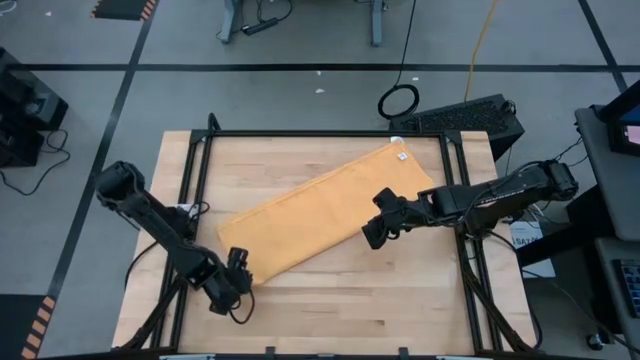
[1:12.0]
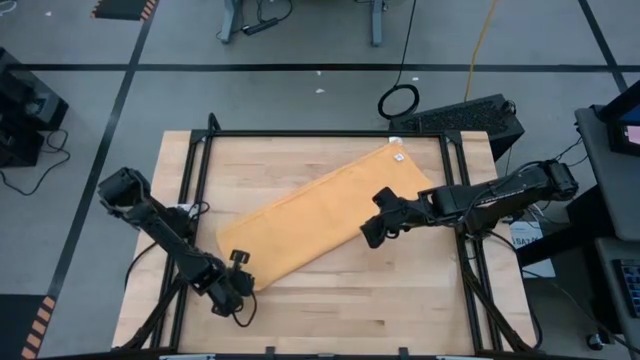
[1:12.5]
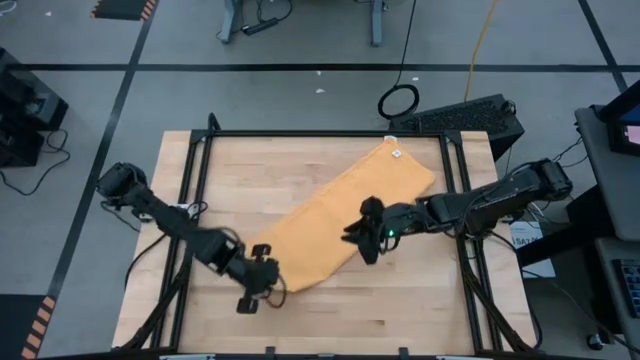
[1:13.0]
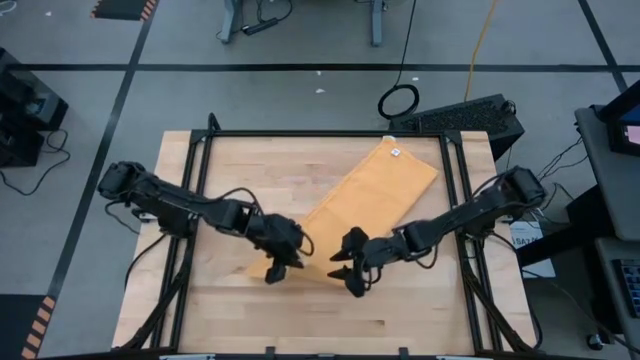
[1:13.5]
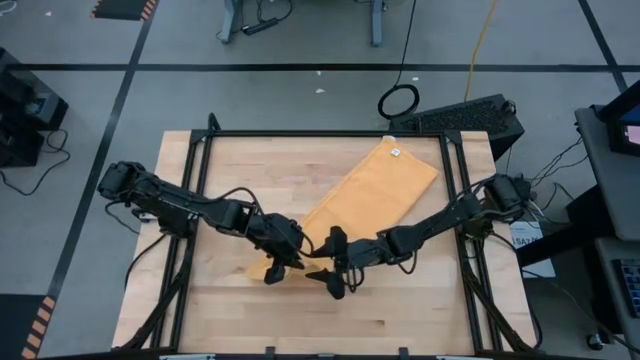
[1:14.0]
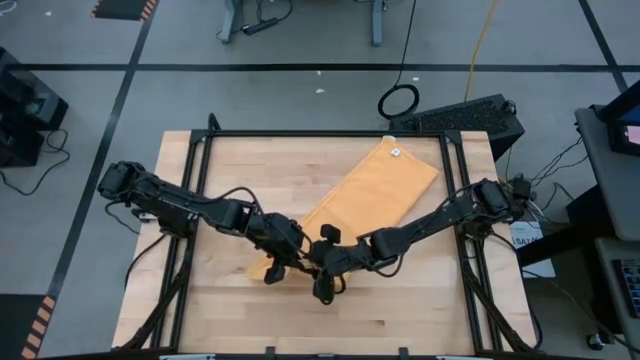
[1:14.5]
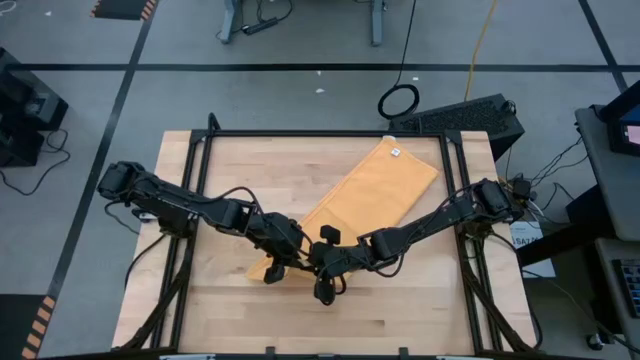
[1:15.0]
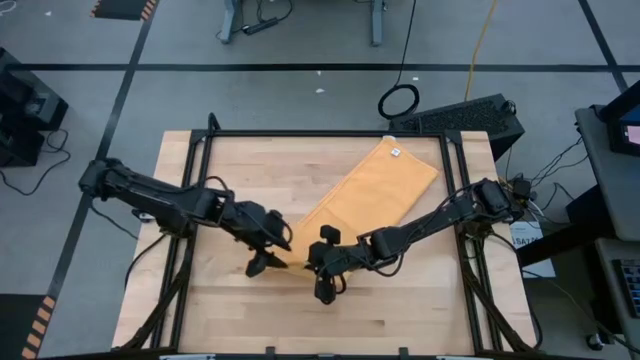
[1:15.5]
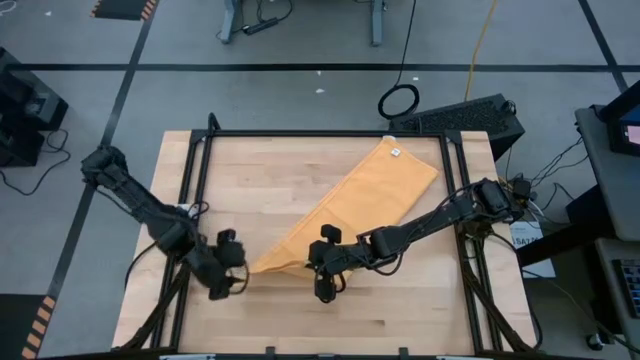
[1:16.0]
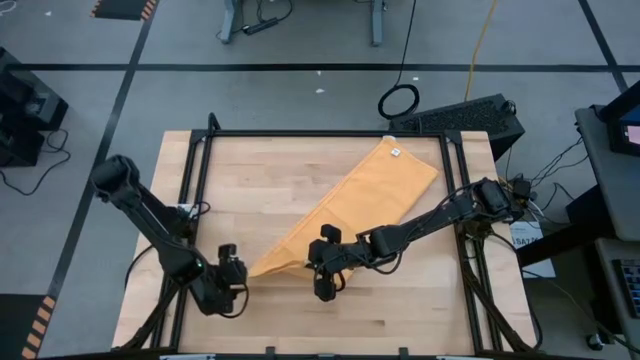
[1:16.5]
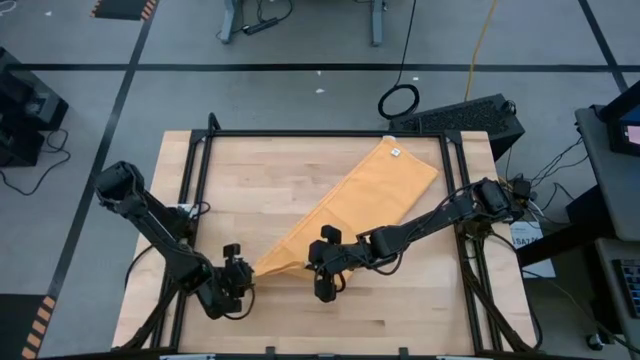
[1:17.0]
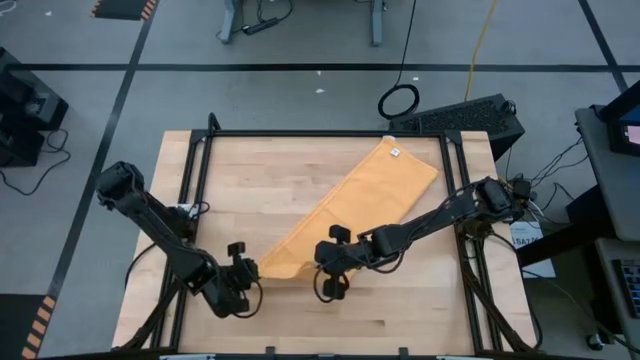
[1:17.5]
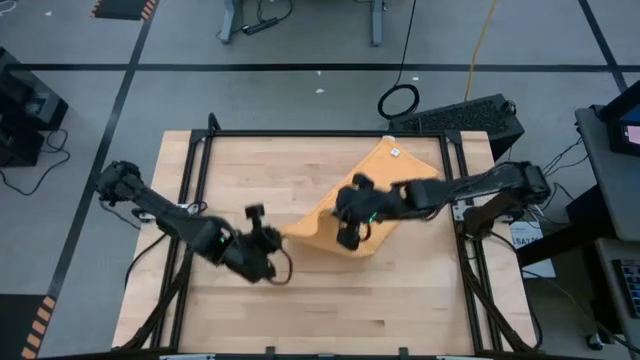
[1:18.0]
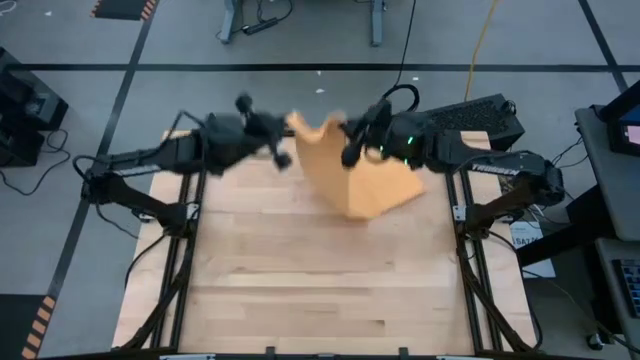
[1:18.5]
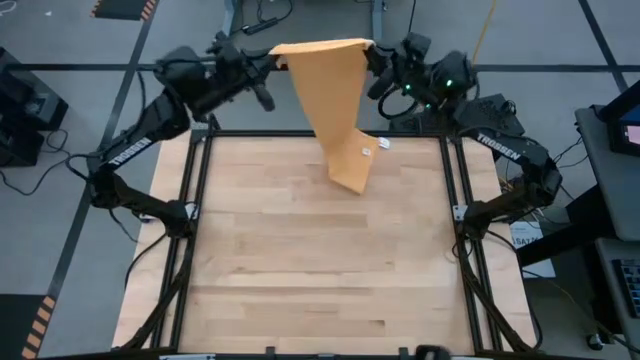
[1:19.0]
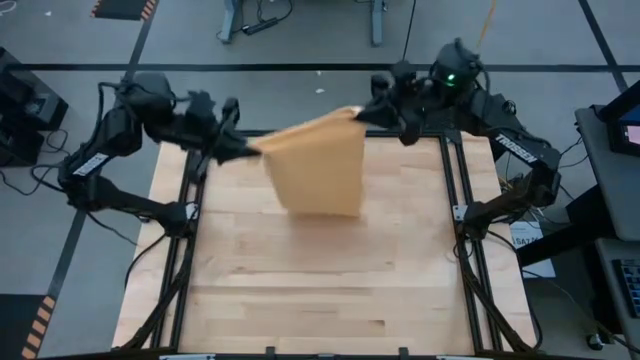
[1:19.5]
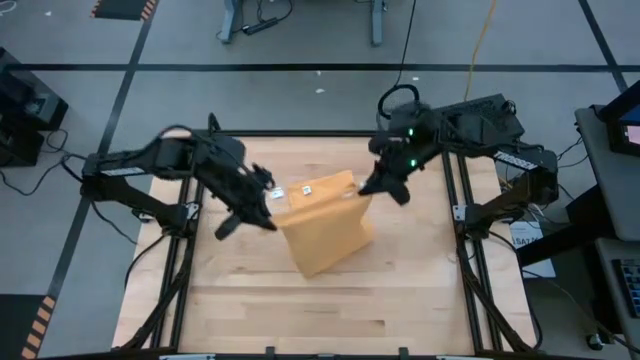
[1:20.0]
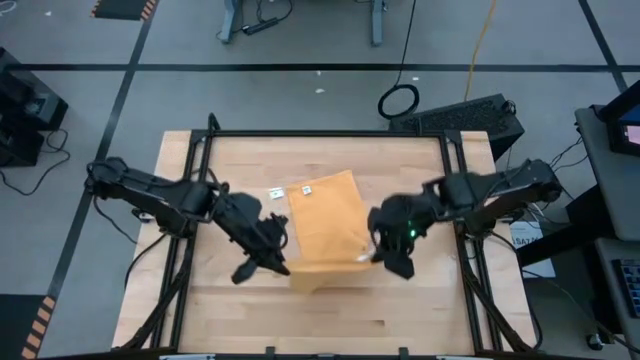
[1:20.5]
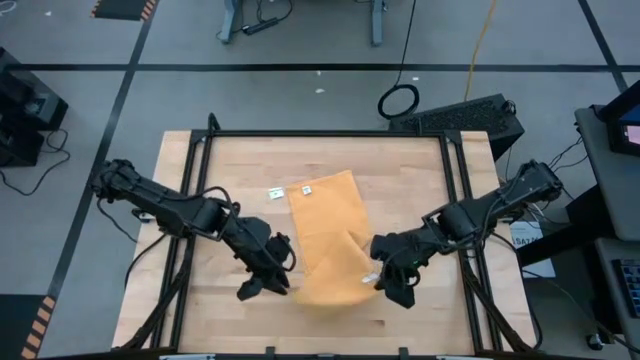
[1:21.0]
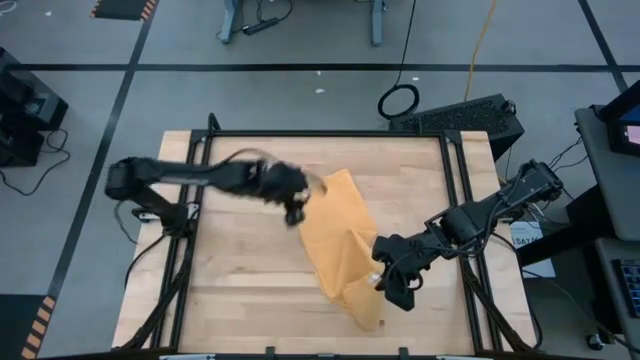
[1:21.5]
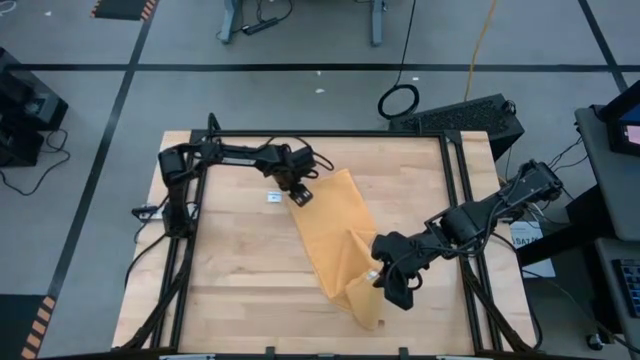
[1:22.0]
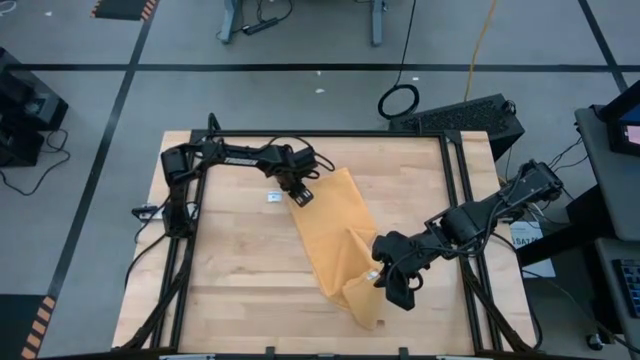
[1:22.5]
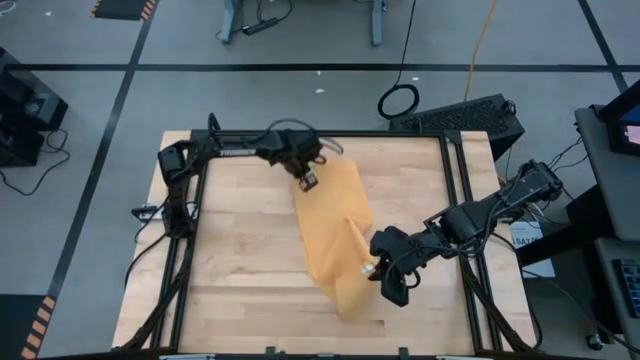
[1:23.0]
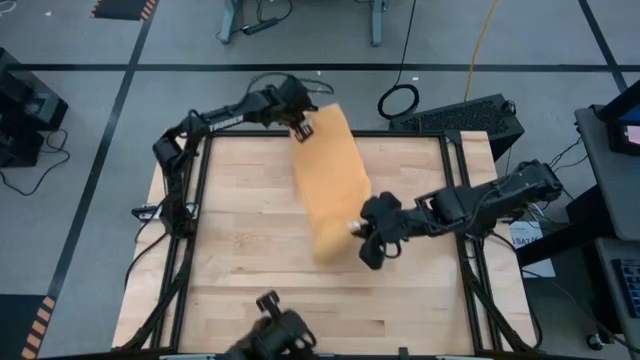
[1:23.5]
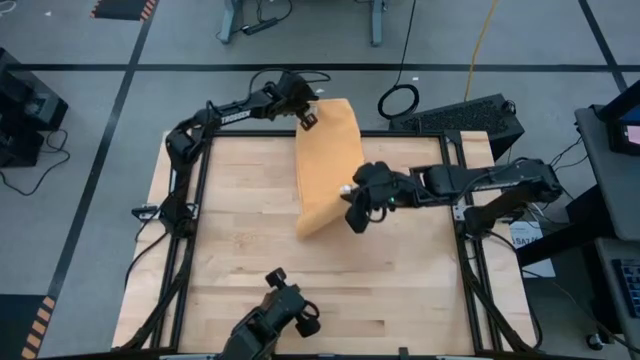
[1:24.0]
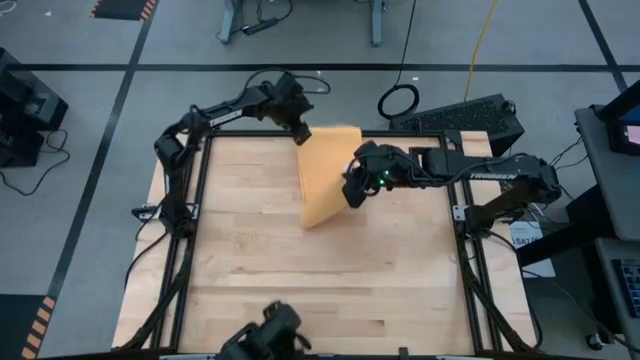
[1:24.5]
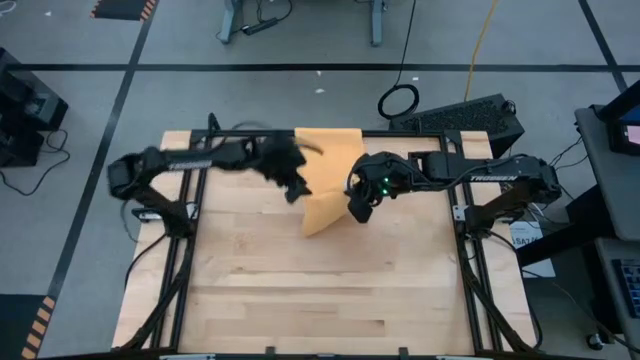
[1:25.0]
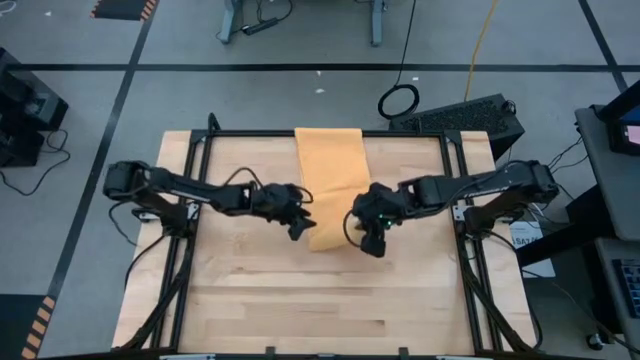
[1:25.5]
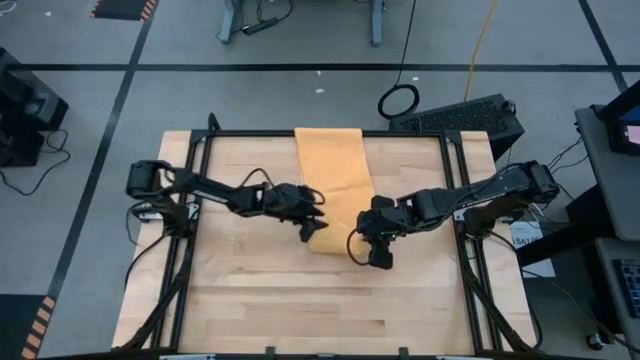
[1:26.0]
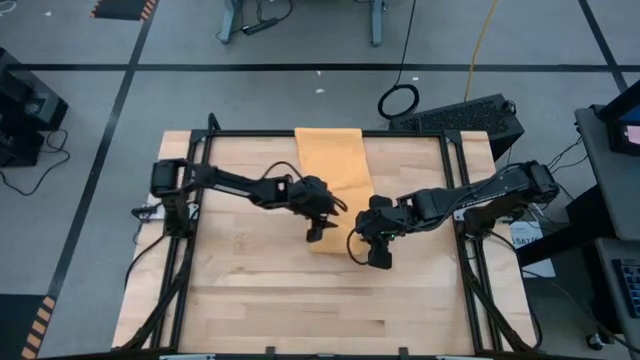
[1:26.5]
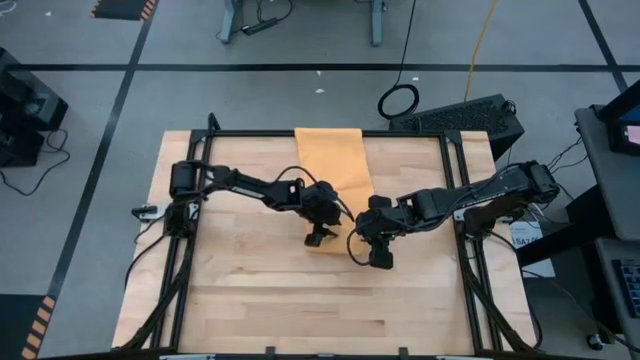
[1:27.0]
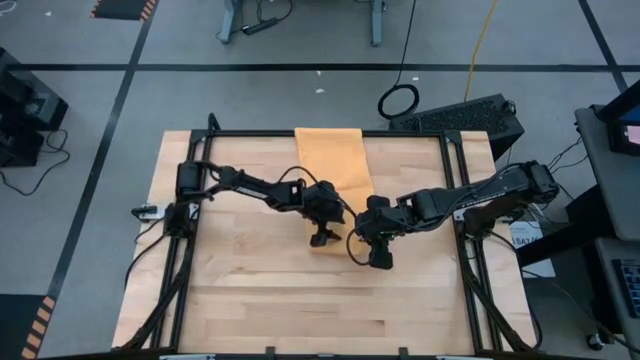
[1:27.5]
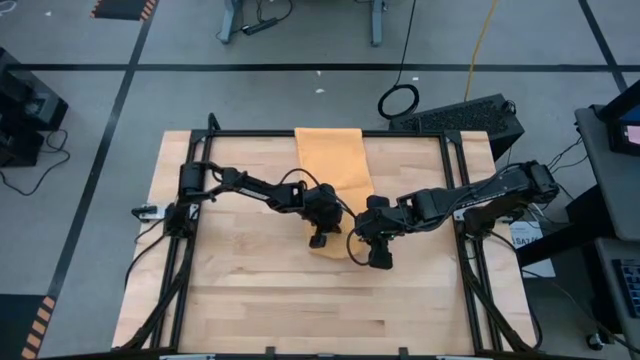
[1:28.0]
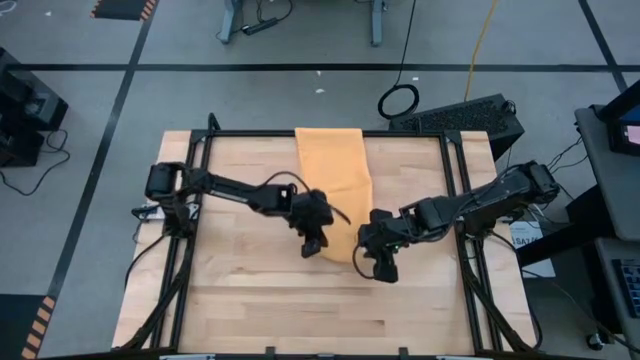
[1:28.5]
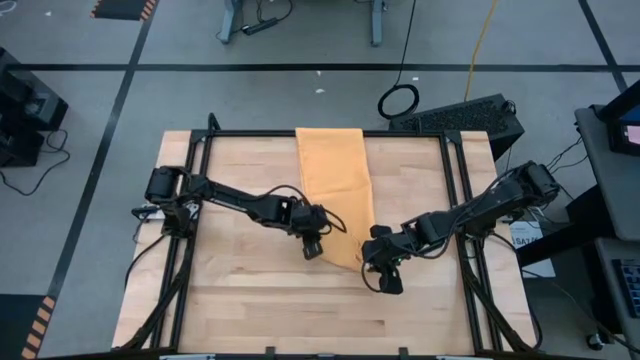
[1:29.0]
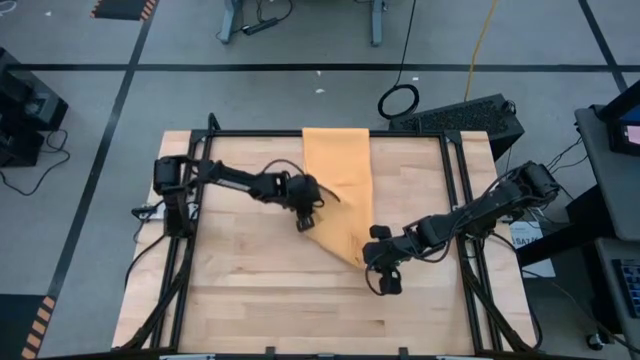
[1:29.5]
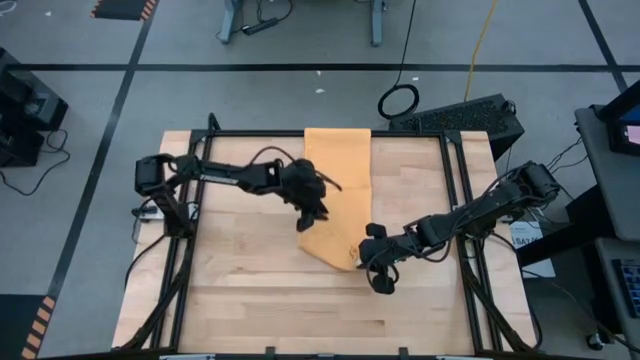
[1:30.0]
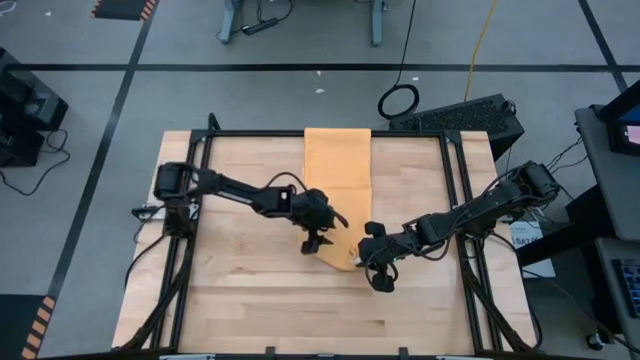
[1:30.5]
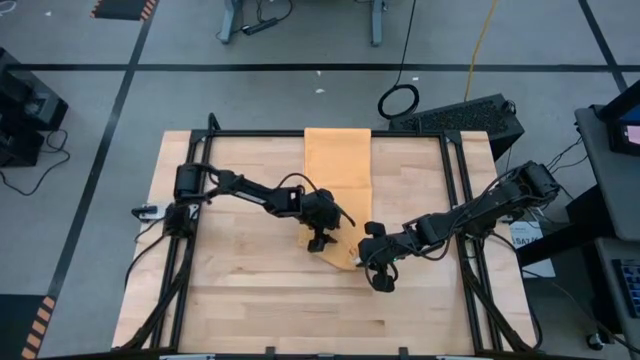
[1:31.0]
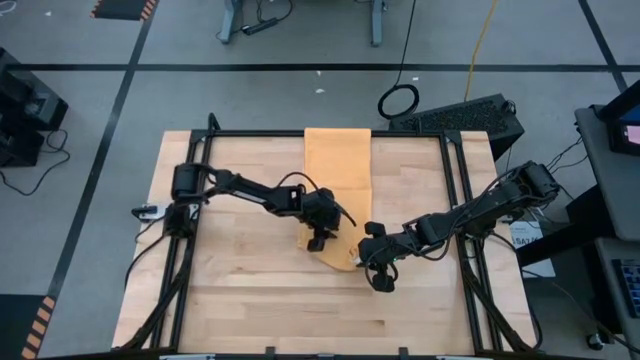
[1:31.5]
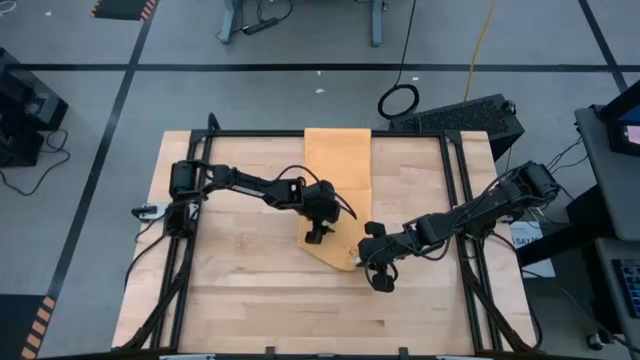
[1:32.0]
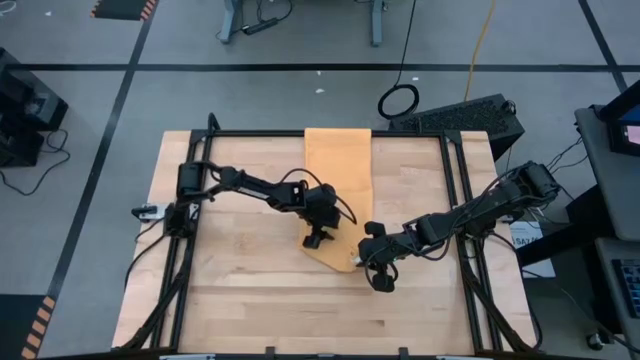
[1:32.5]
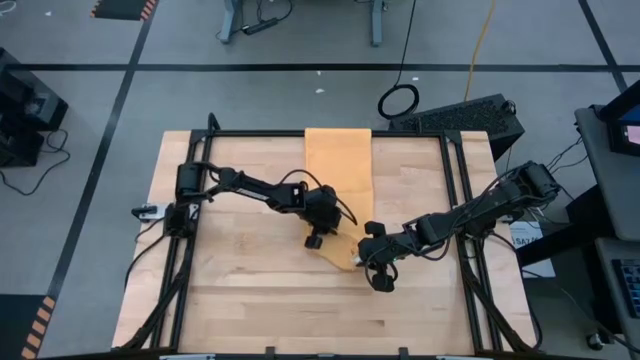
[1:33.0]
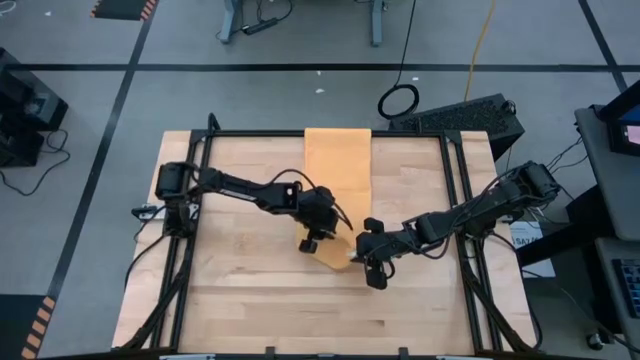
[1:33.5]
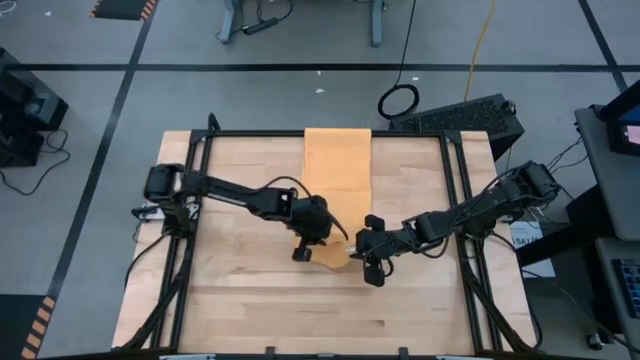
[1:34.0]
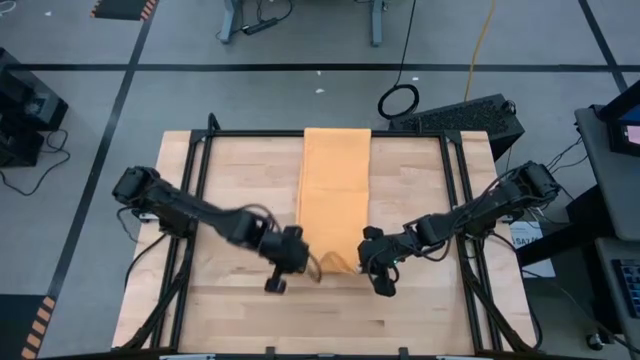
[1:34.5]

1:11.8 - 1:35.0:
Task: Roll towel into tight, uniform cylinder
Roll the orange towel
